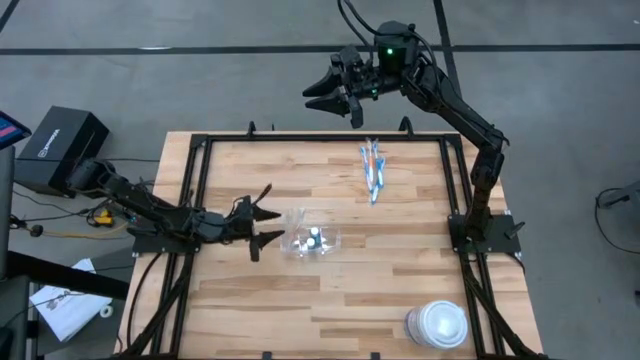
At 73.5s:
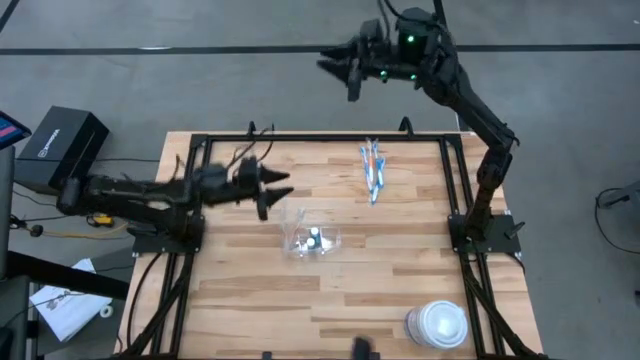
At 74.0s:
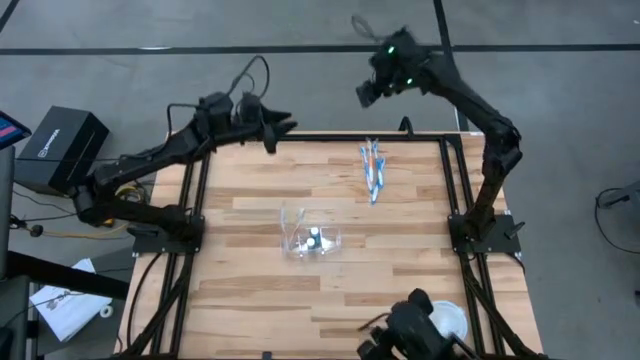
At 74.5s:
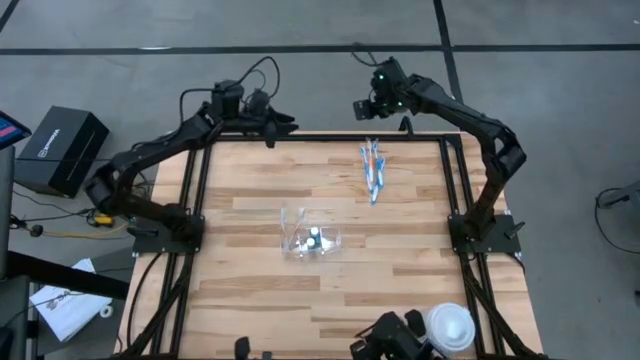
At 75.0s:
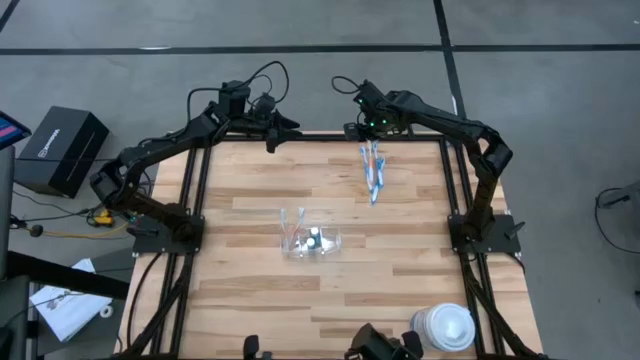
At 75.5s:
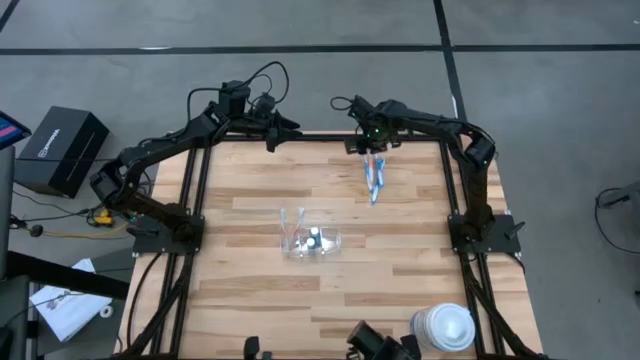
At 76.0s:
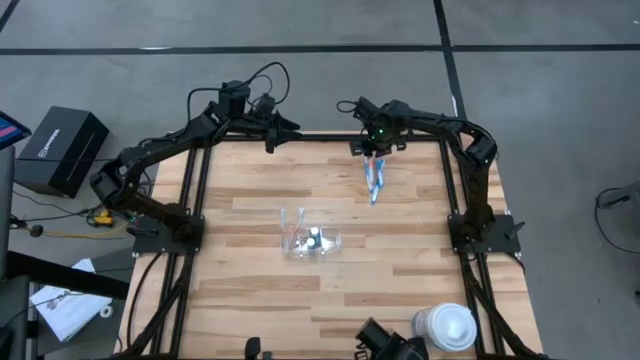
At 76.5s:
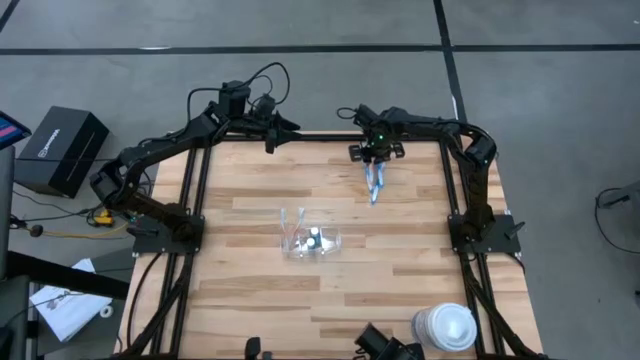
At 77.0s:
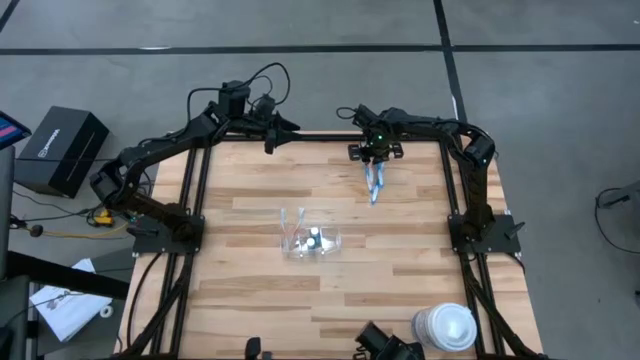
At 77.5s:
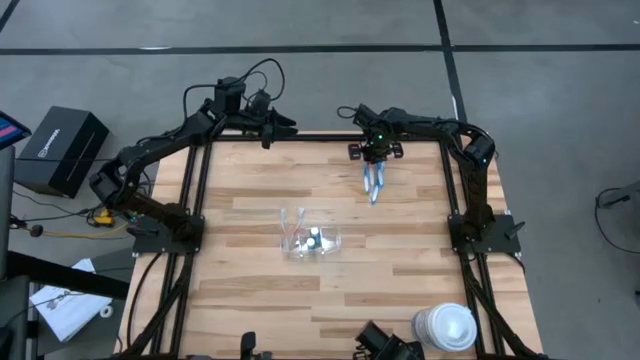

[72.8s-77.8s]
Task: Pick & Place toothbrushing station
Put the orange toothbrush into the transparent organizer

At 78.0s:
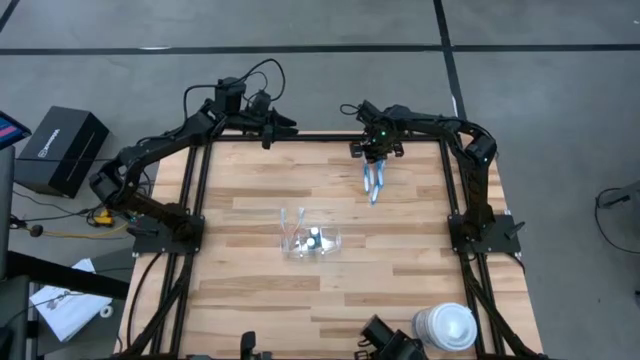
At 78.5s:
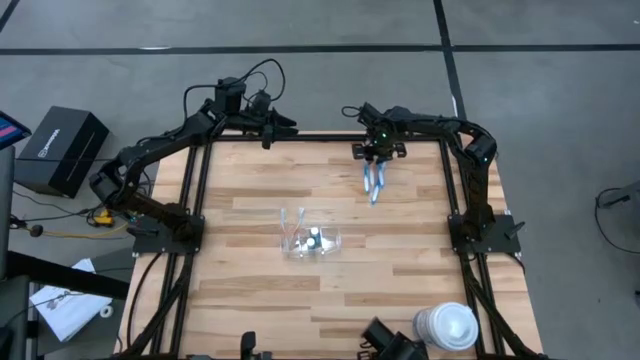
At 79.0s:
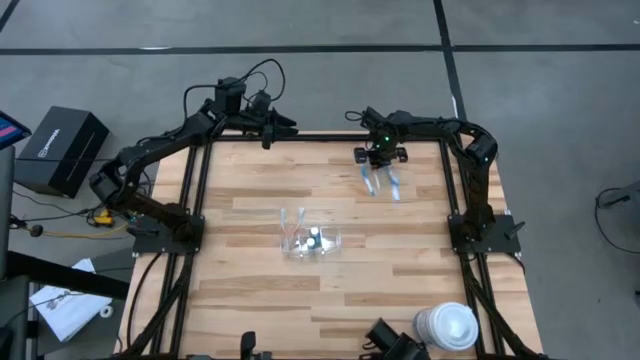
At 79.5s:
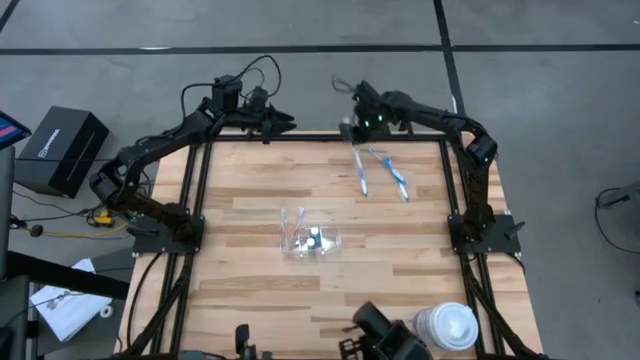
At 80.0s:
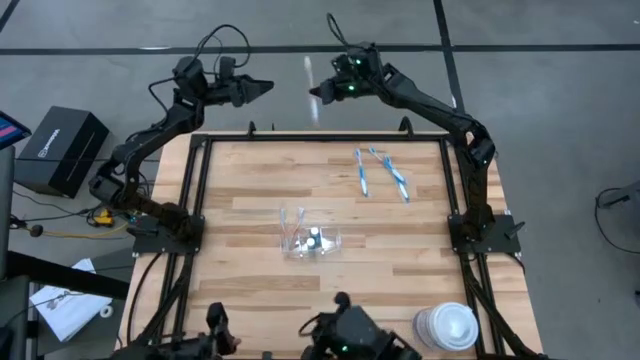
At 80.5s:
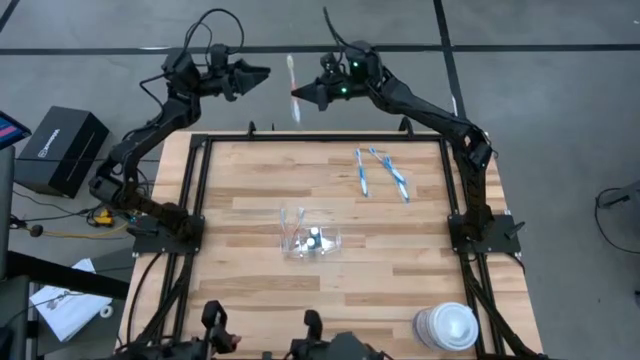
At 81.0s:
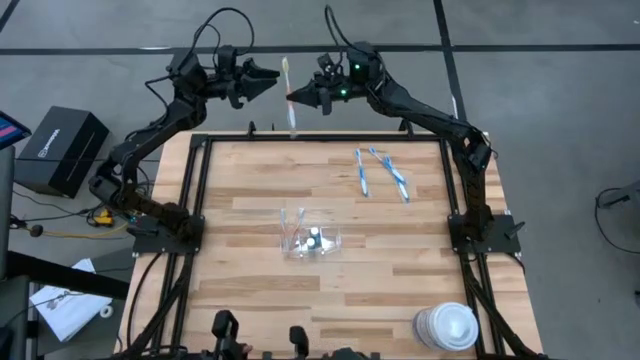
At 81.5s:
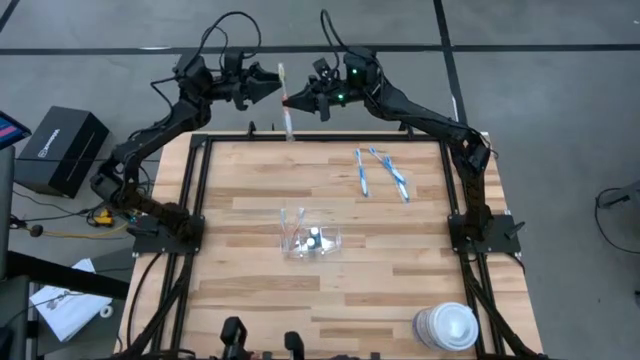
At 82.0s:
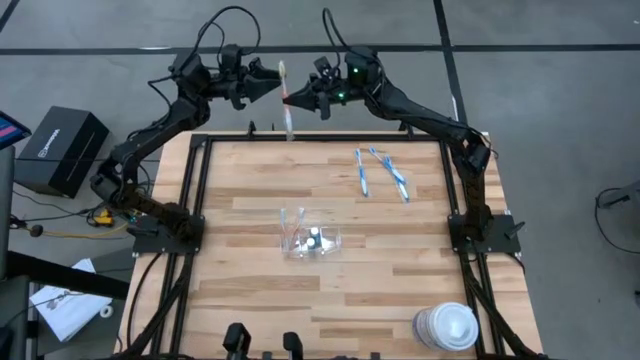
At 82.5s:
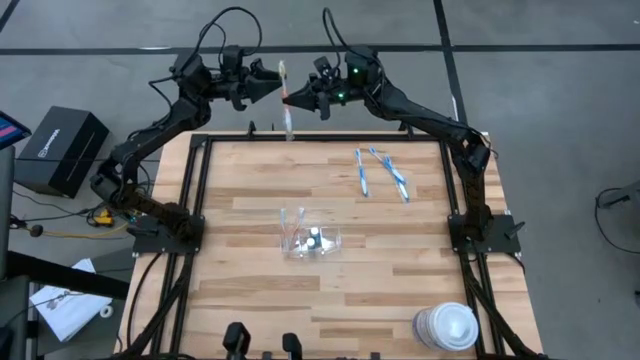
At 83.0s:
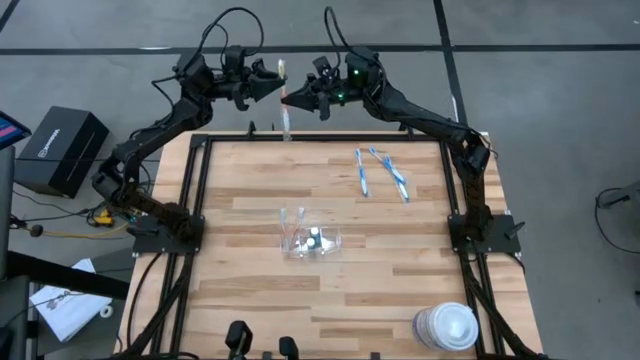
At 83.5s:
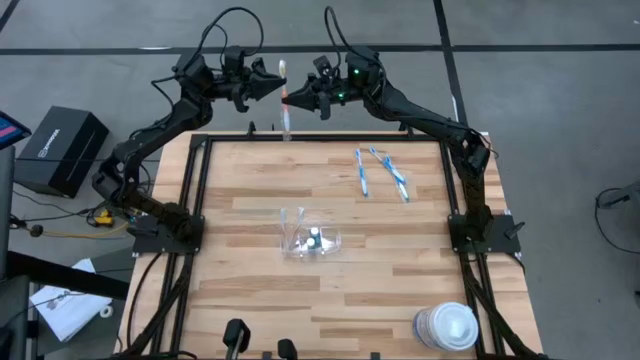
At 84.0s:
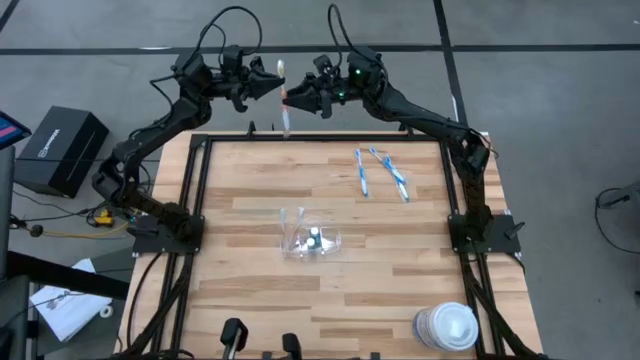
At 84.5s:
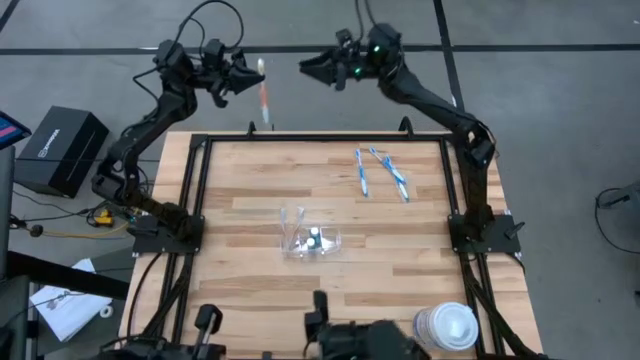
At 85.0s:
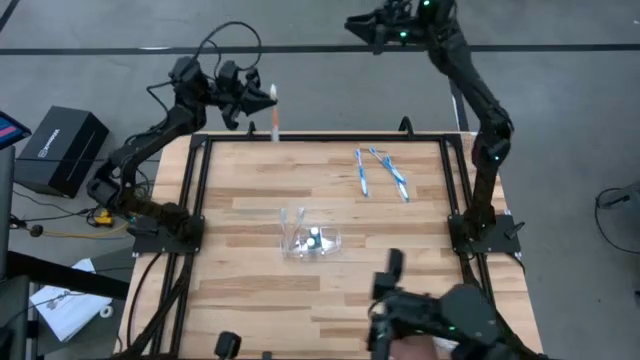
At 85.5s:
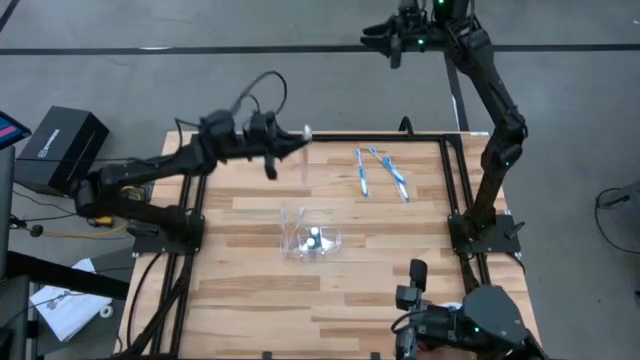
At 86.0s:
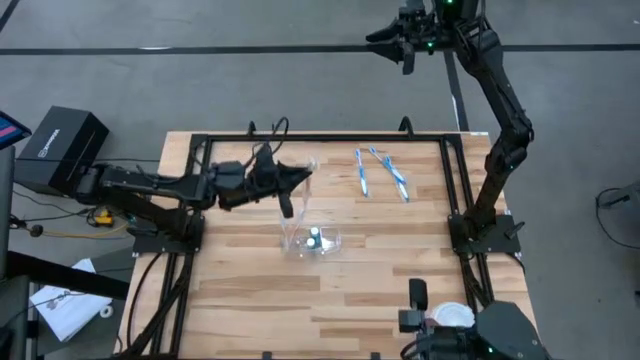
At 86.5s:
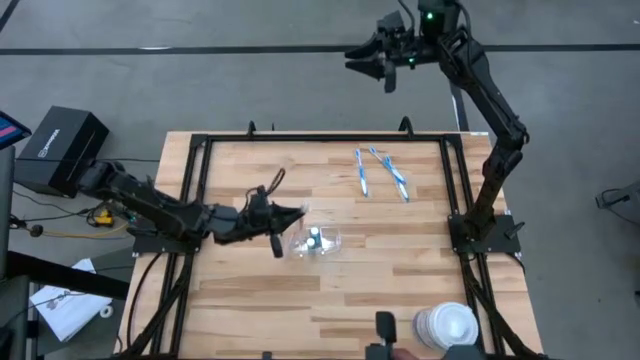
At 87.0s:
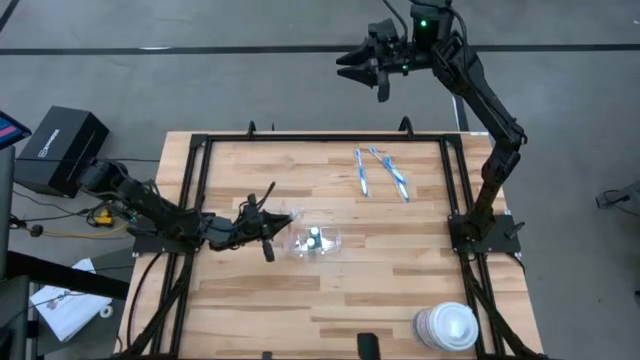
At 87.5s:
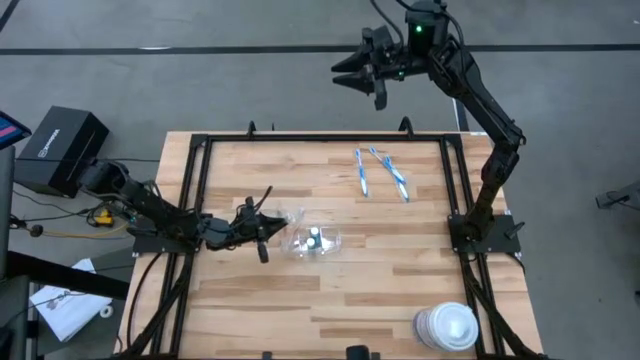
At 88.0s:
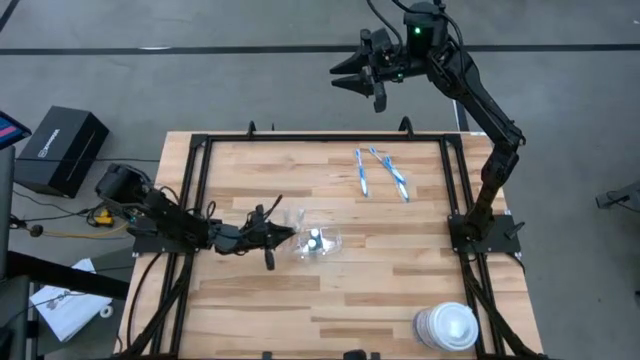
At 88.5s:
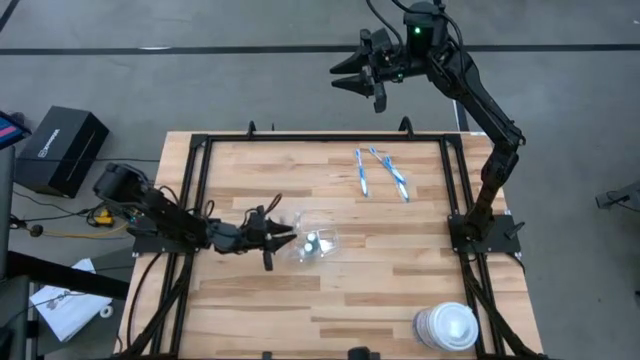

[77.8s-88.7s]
Put the orange toothbrush into the transparent organizer

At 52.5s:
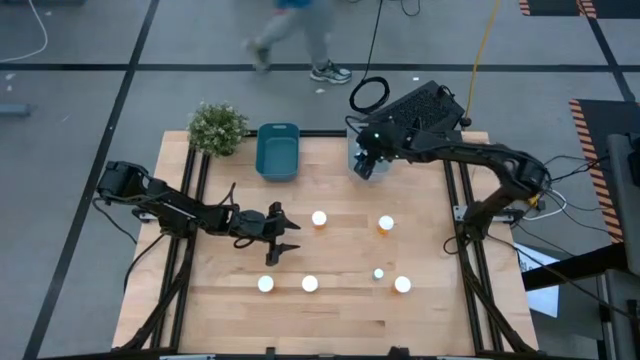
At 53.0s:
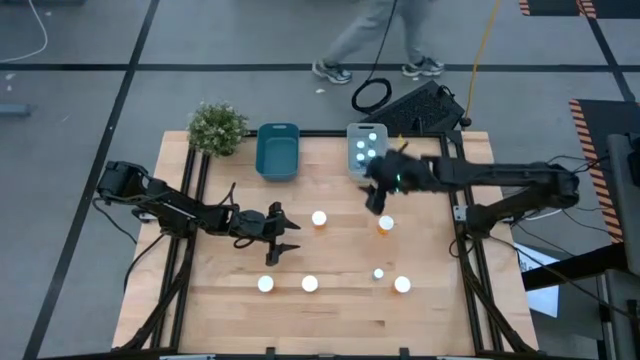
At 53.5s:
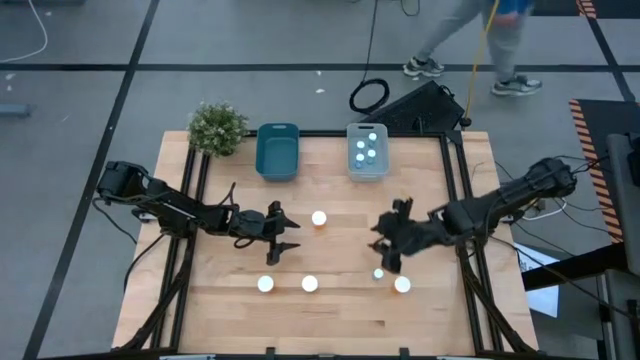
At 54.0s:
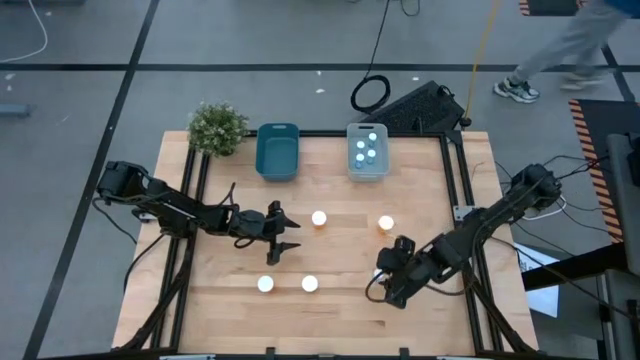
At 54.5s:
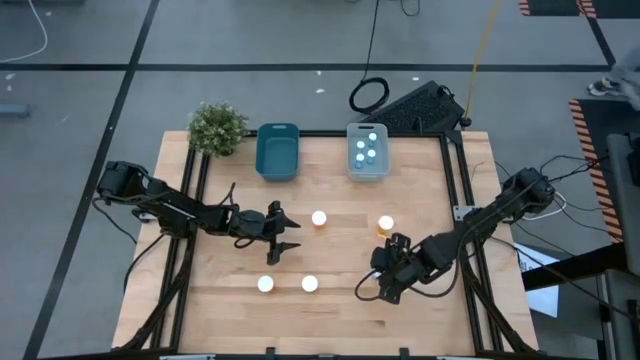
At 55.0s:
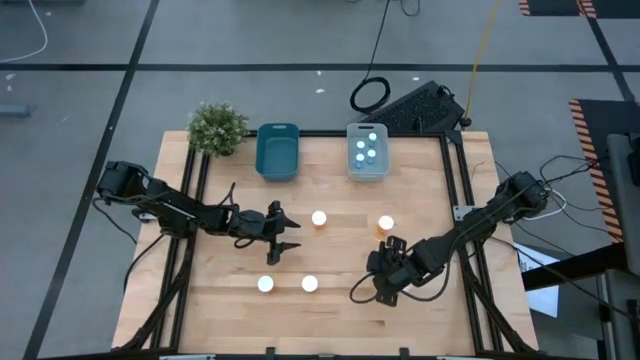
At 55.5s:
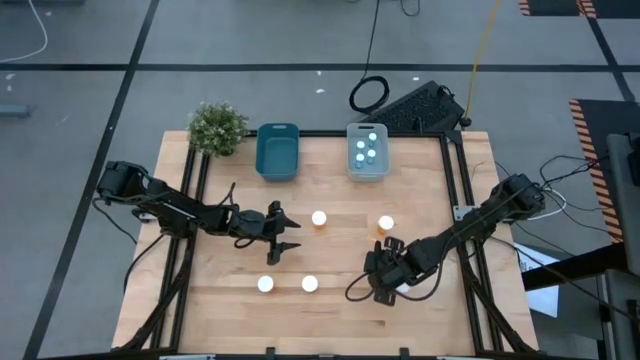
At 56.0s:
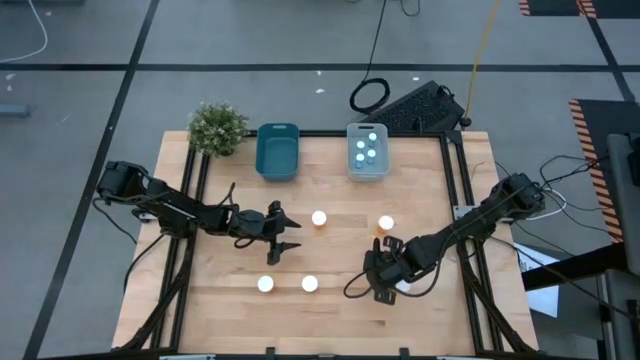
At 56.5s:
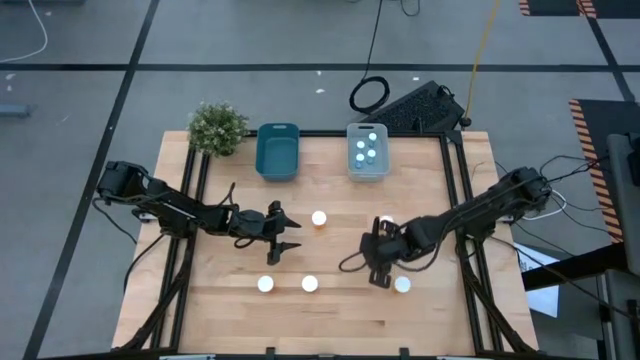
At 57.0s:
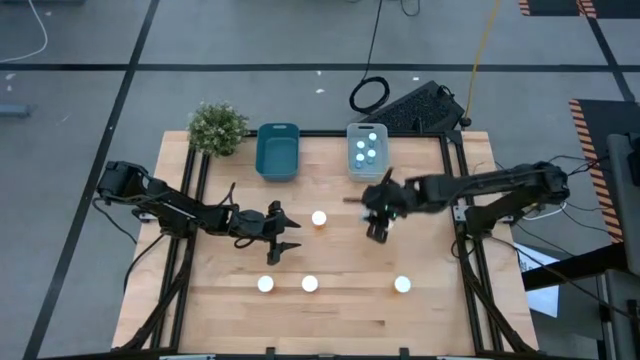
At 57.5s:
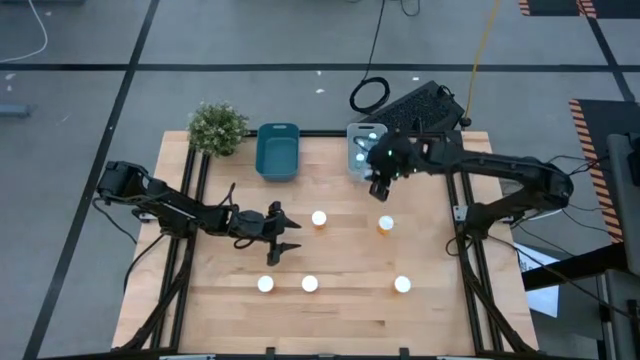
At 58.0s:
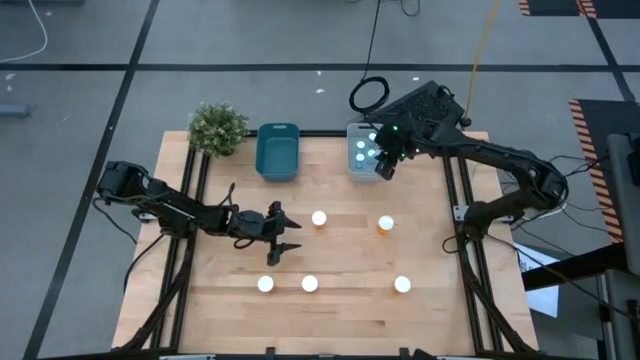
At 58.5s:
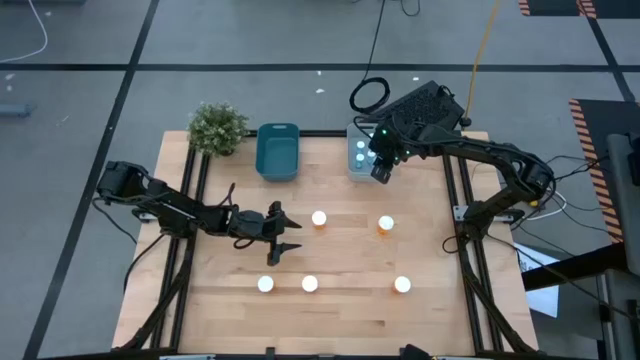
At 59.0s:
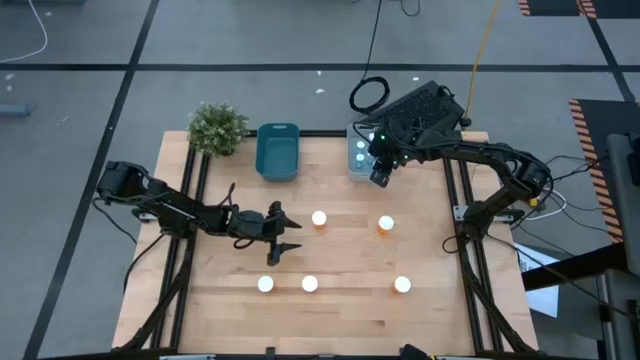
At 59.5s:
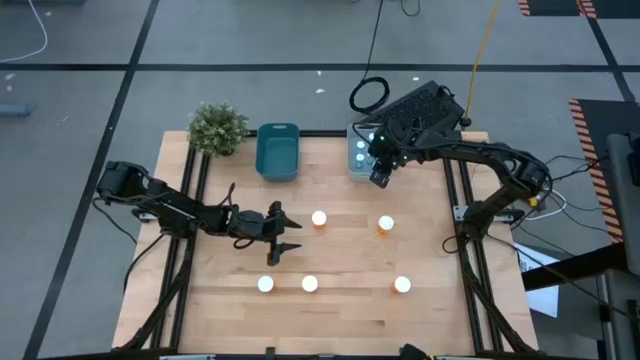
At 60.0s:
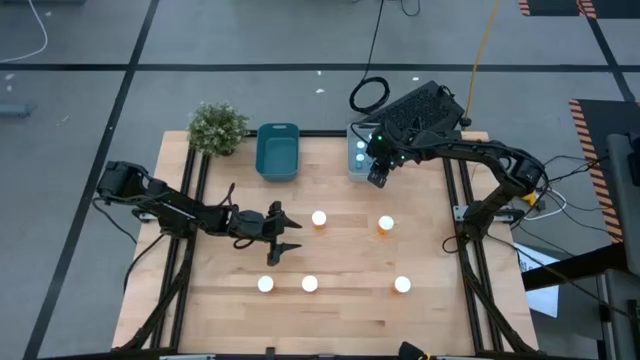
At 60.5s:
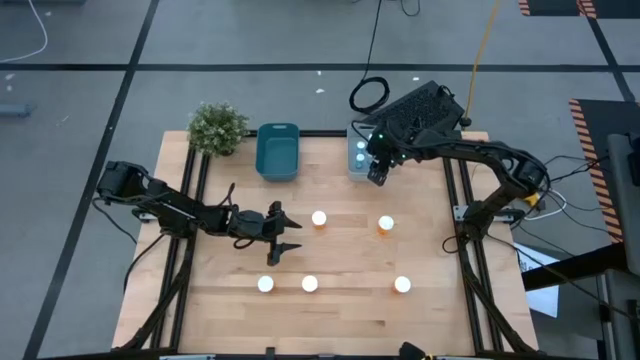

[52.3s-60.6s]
Task: Pick and place medicine bottles into bin by pill shape (circle, oval)
Put the blue pill bottle into the gray bin
